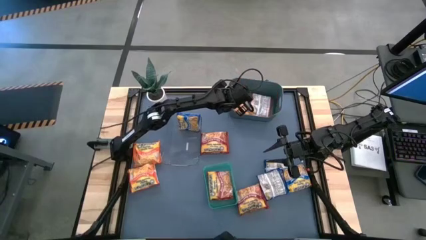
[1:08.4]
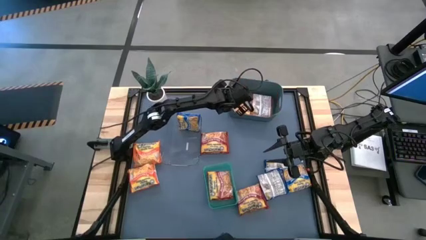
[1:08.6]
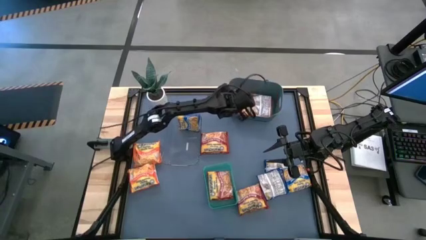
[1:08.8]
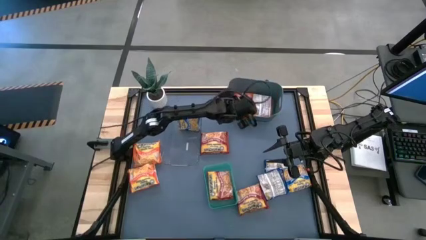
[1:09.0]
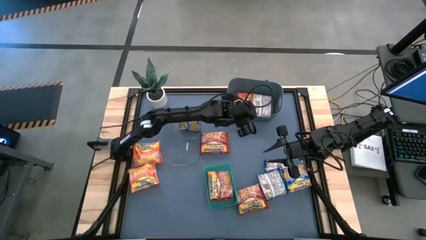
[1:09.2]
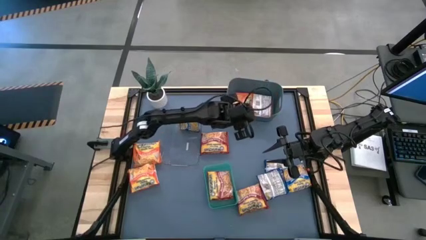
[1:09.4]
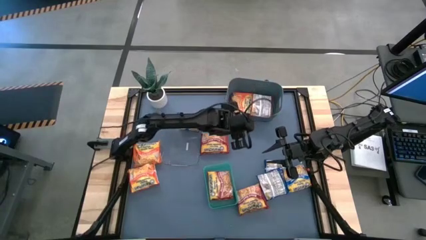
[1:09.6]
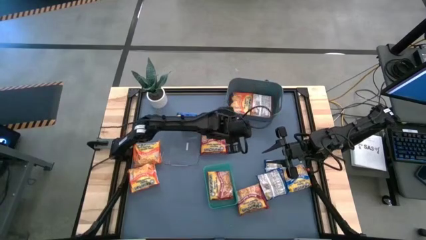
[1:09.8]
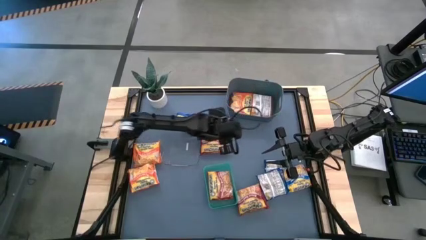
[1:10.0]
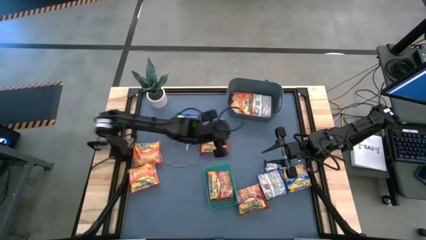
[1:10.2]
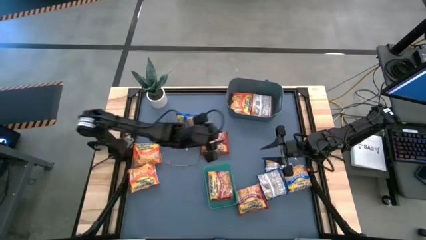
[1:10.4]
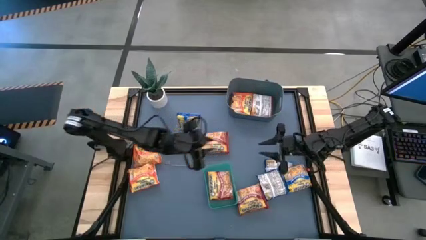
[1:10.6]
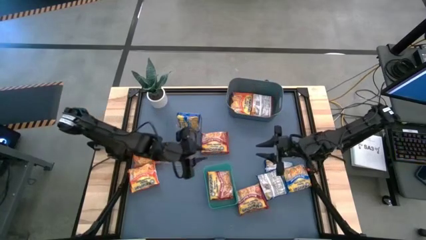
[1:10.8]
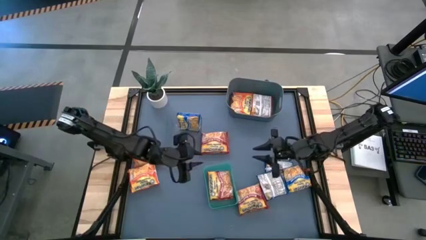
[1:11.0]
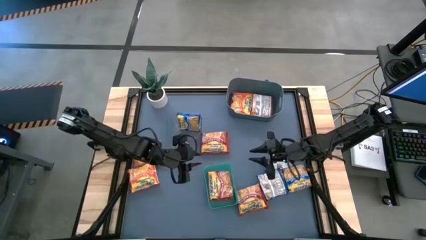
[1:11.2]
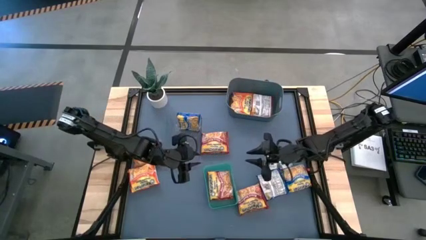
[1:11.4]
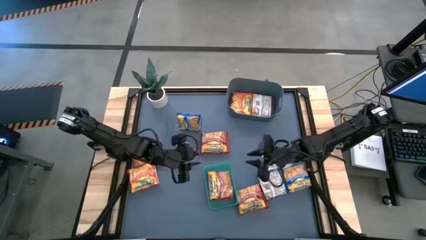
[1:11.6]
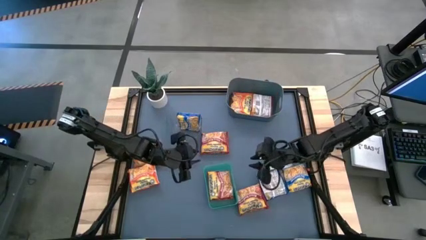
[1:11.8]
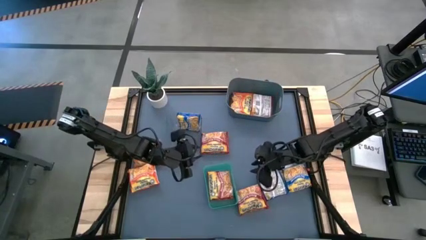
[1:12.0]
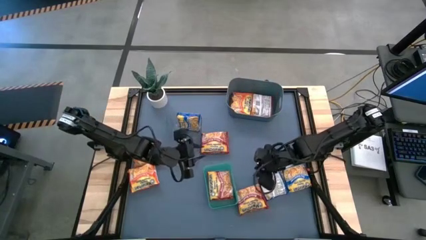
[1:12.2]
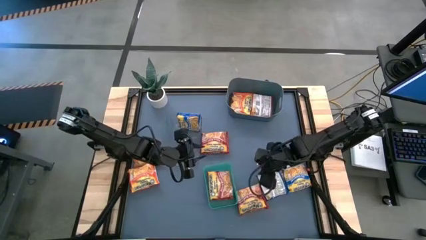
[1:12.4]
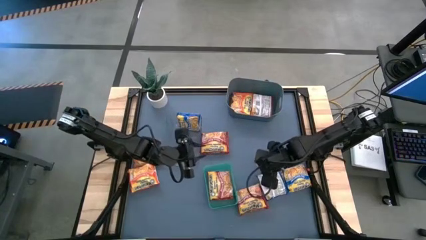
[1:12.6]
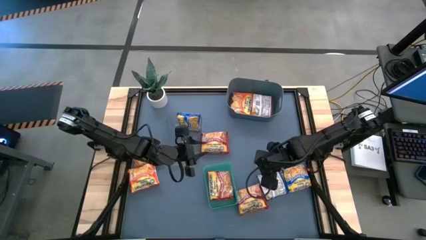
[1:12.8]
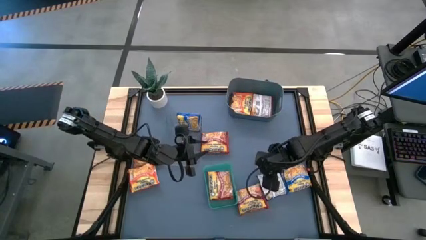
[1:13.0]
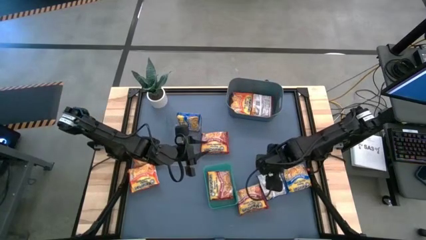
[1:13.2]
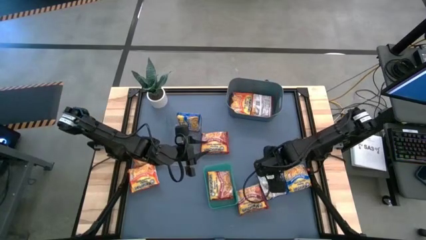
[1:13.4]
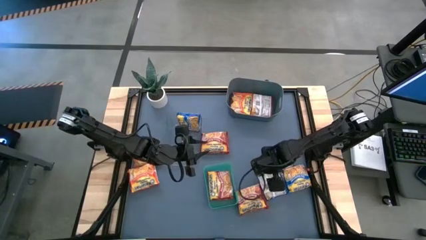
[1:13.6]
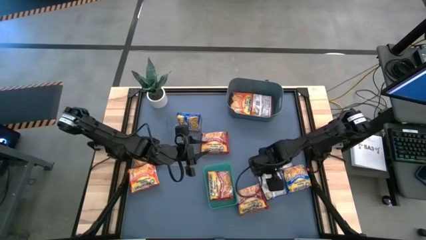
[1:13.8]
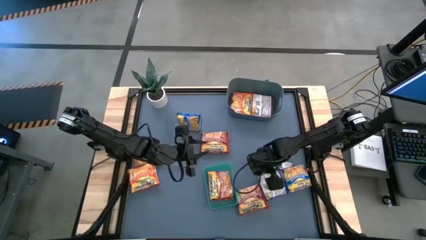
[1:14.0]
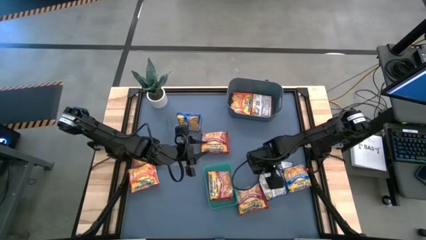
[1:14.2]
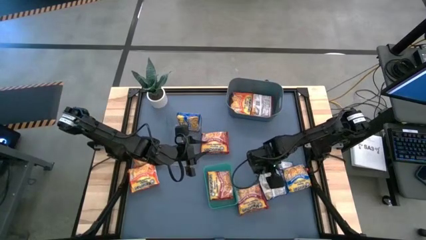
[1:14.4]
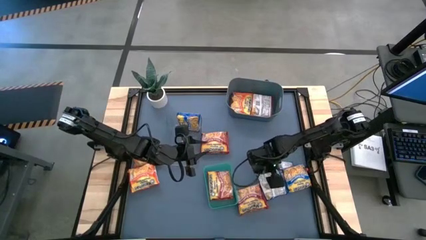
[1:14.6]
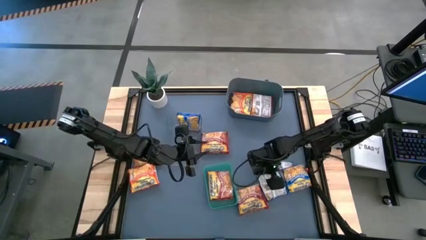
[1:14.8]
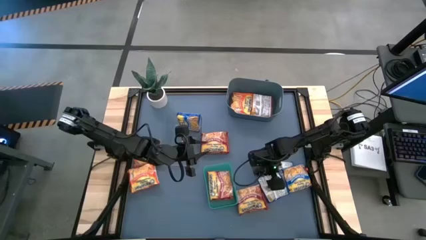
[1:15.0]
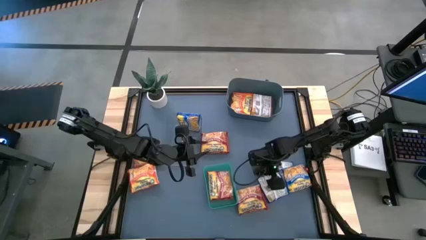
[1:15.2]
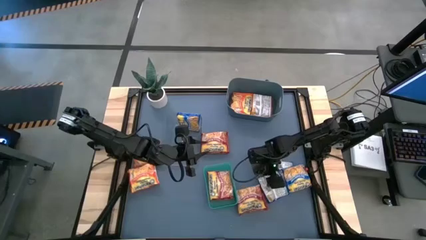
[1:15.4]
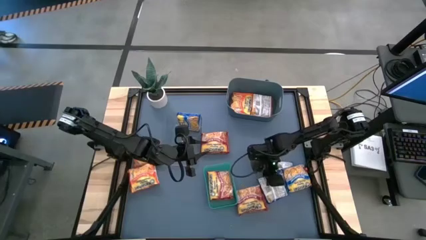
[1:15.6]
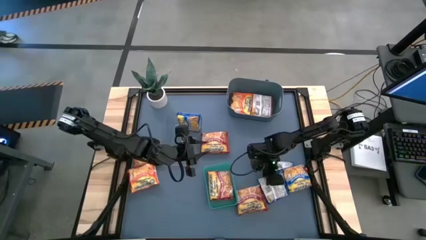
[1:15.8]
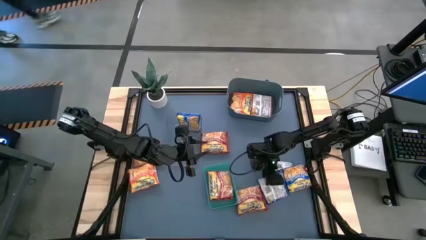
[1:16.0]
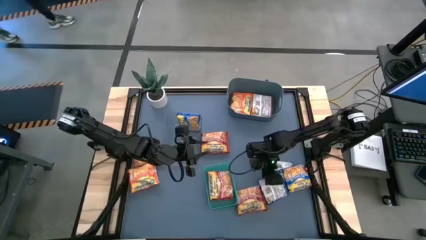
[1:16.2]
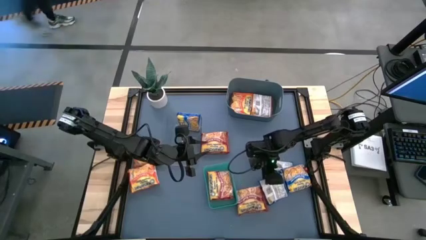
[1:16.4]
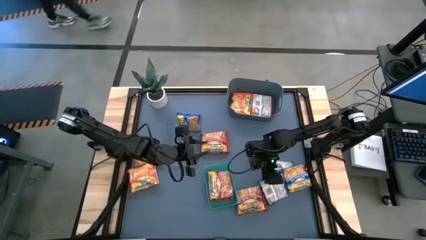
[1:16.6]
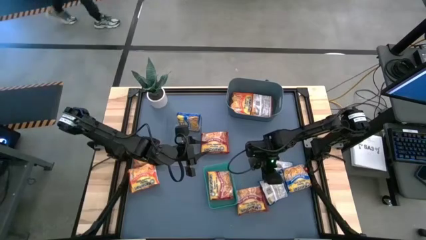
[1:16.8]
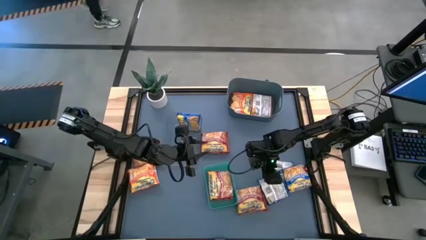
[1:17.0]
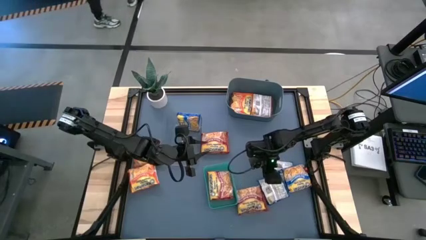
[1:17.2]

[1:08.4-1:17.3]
Task: Sort Maruchan noodles
Put the blue noodle pack into the transparent bin

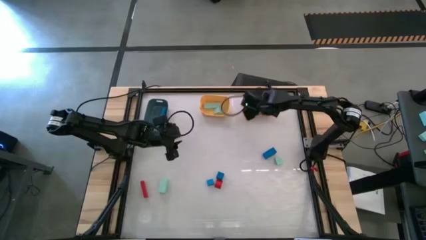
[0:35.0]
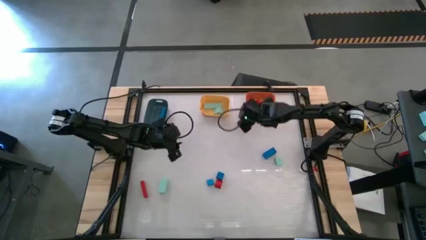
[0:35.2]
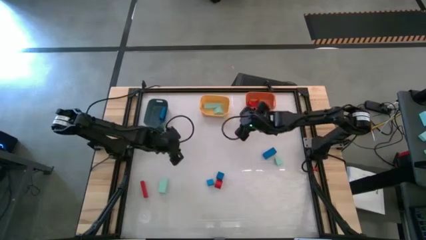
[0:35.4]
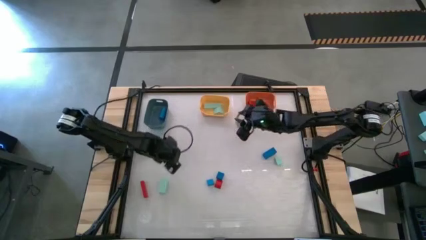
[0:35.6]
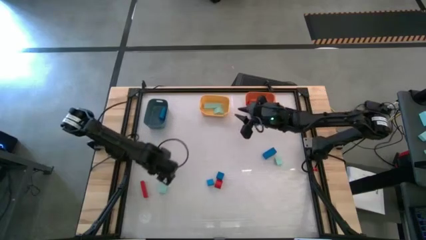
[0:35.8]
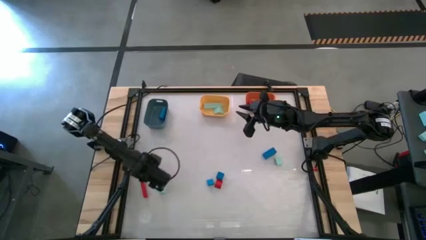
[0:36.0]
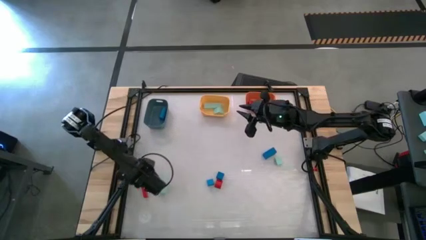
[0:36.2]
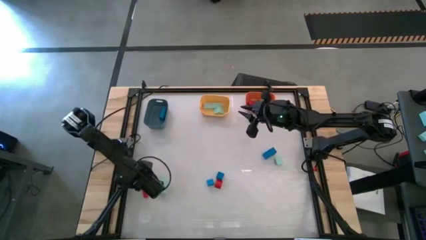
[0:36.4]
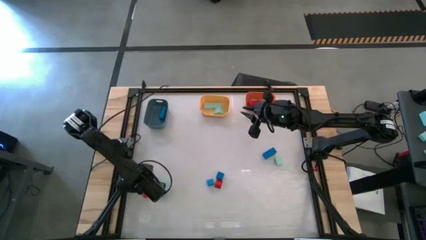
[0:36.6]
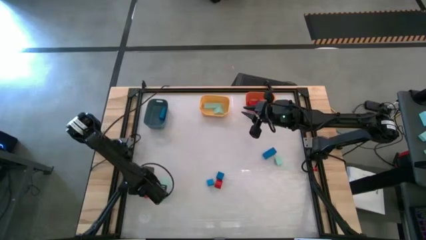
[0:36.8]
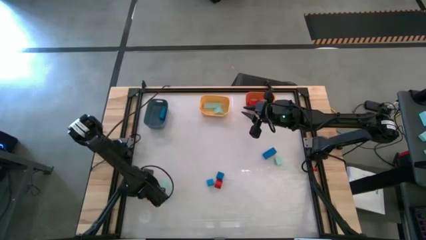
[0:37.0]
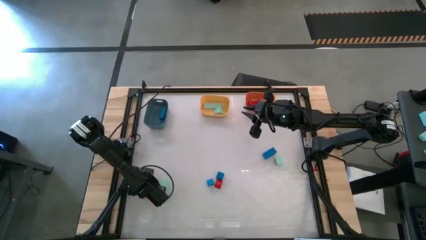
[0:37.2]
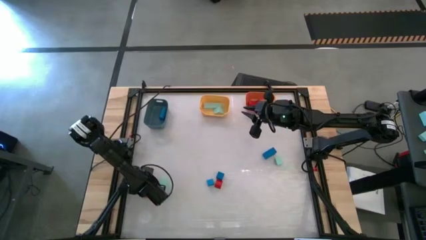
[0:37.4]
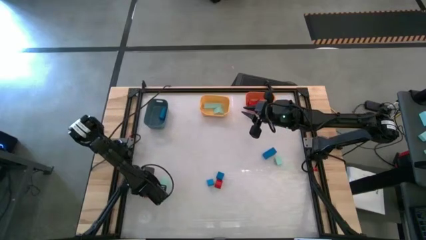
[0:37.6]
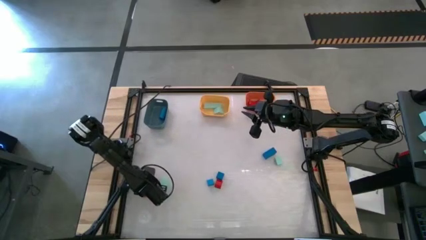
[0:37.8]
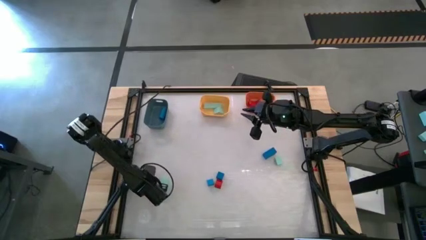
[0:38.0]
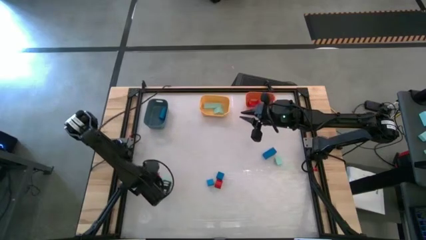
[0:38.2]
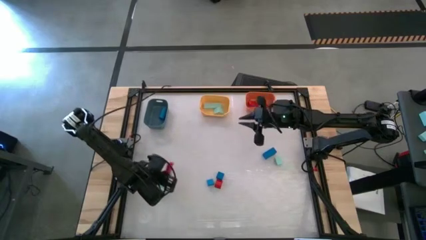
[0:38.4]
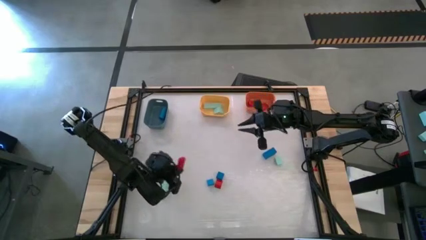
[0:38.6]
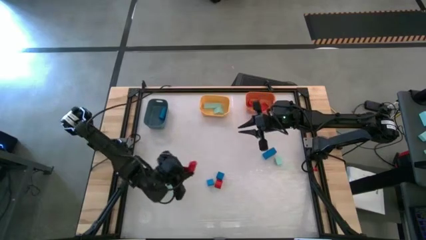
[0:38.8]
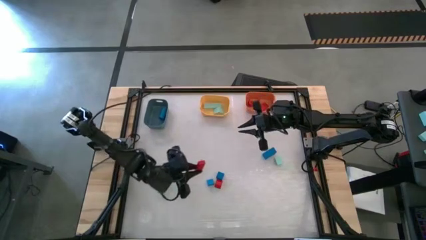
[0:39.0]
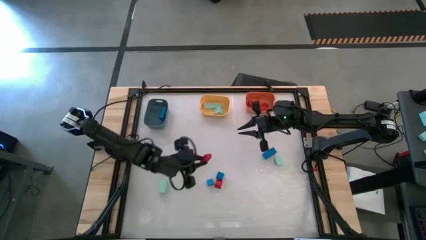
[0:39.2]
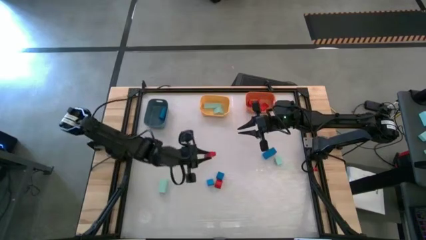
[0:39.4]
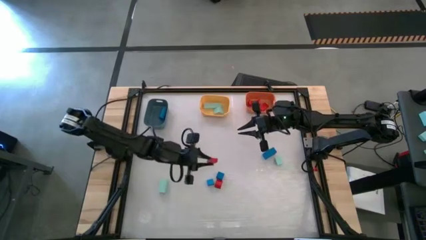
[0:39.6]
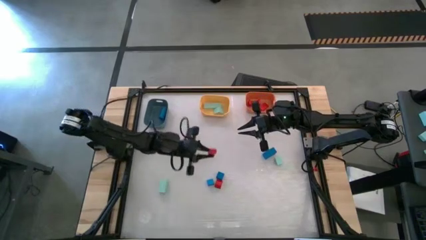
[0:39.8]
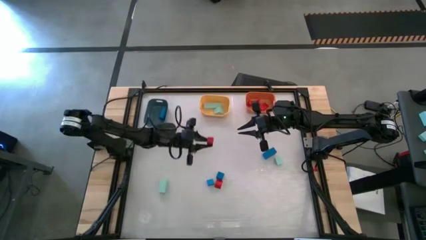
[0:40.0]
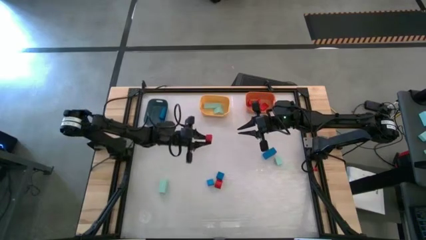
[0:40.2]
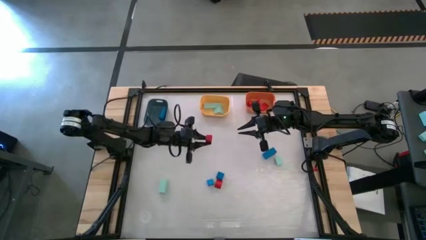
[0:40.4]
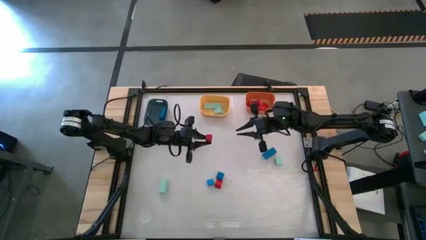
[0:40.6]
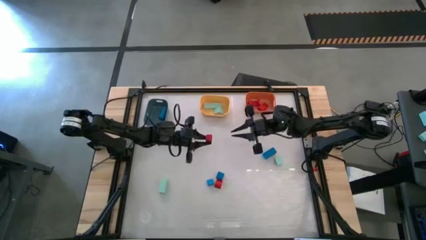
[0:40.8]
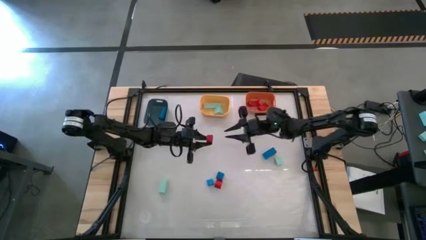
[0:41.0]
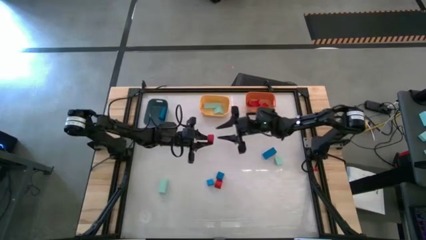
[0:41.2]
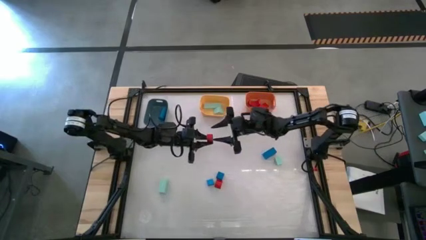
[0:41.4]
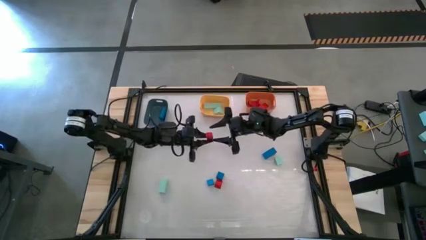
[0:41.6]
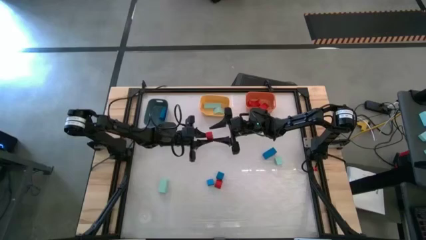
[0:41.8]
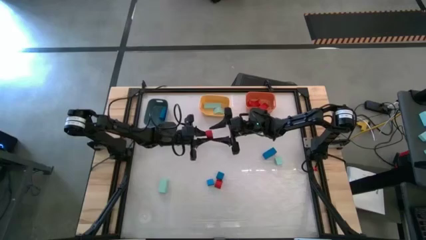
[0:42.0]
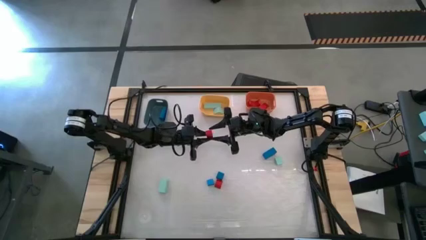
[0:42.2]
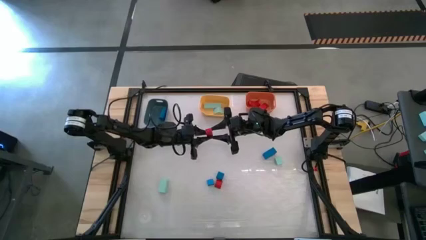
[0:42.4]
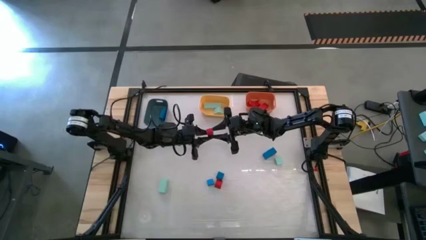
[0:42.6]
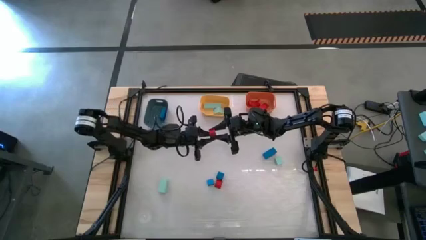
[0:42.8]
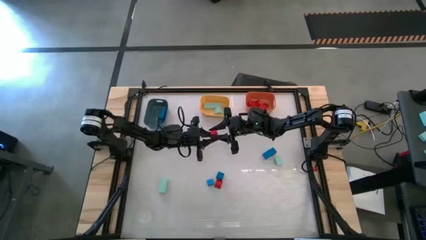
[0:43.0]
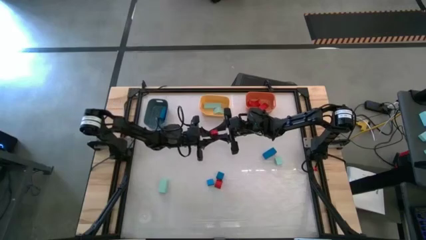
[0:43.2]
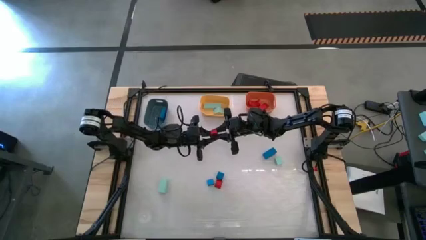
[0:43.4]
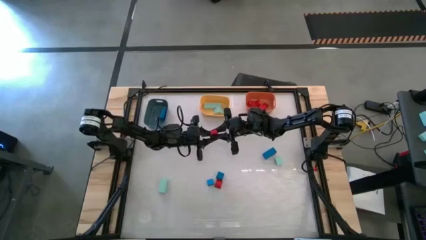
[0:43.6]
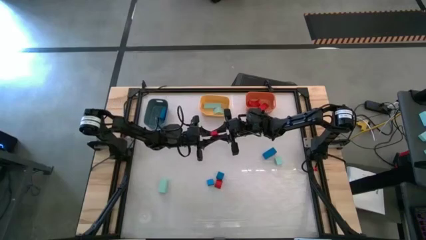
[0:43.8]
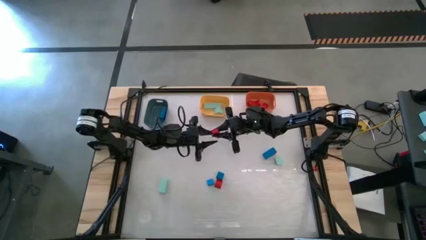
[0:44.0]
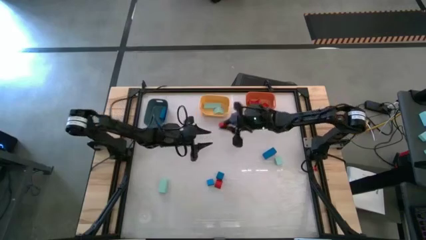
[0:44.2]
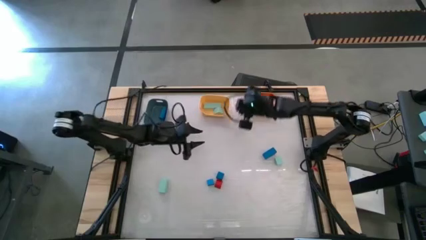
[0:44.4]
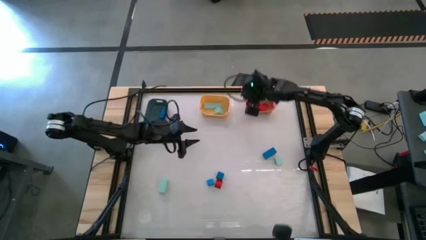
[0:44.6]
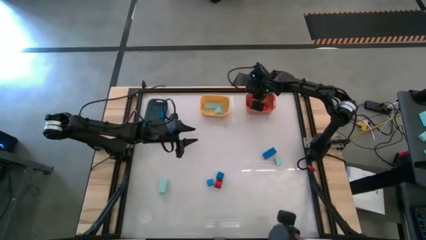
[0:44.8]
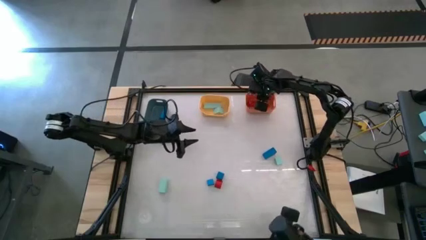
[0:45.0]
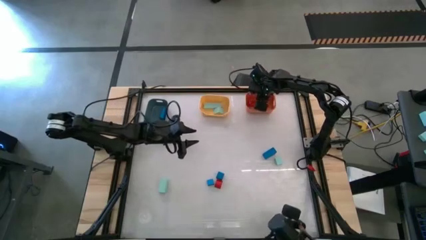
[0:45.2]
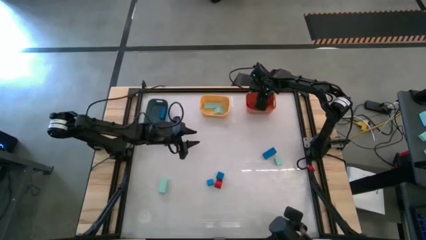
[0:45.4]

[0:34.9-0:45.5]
Task: Sort & place blocks by color
Put the large red rectangular block into the orange bin
